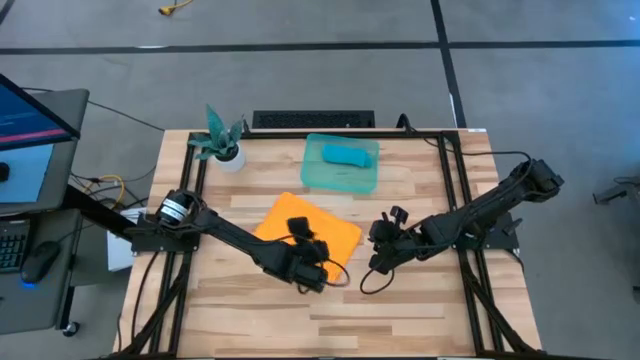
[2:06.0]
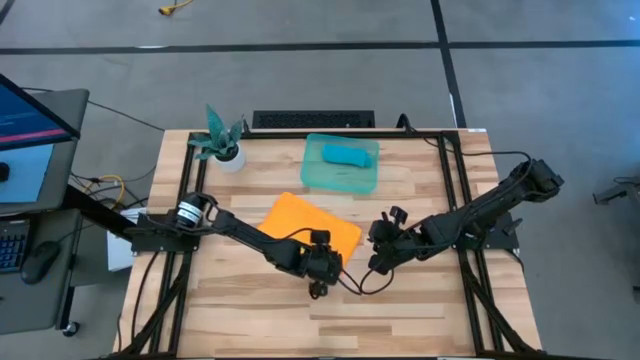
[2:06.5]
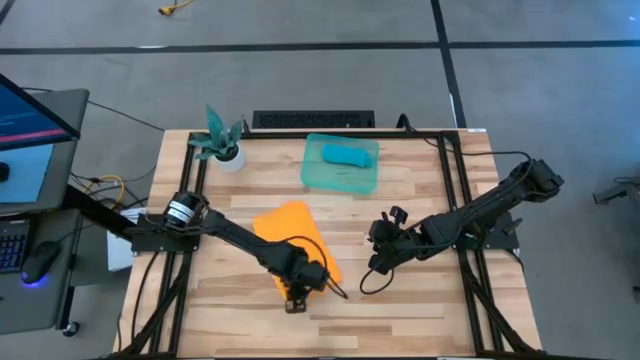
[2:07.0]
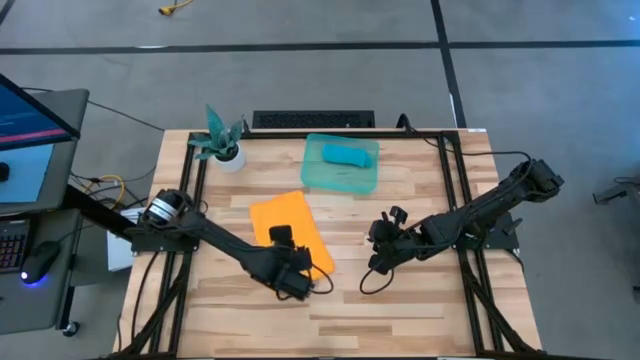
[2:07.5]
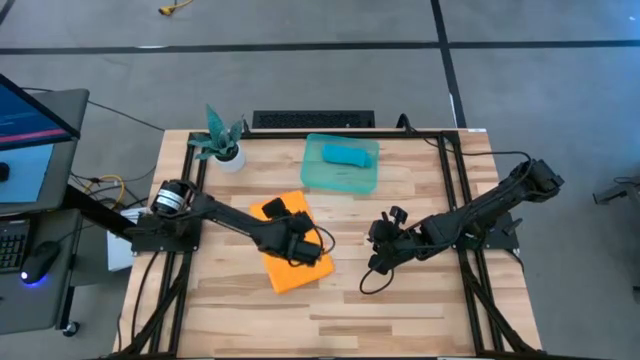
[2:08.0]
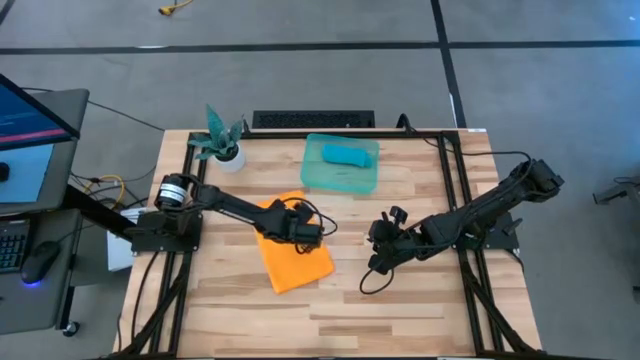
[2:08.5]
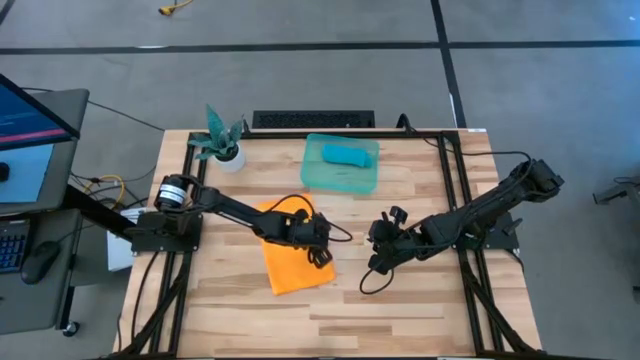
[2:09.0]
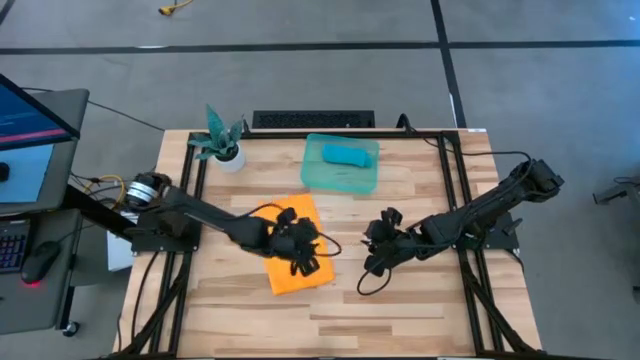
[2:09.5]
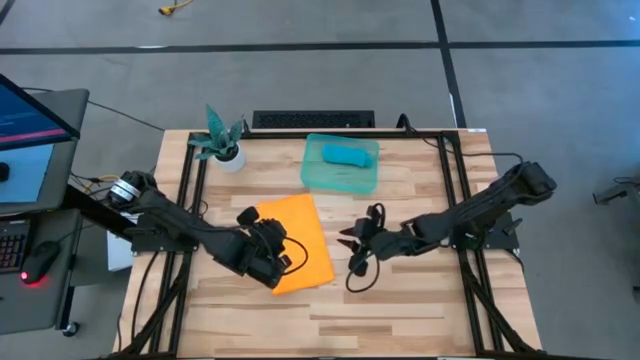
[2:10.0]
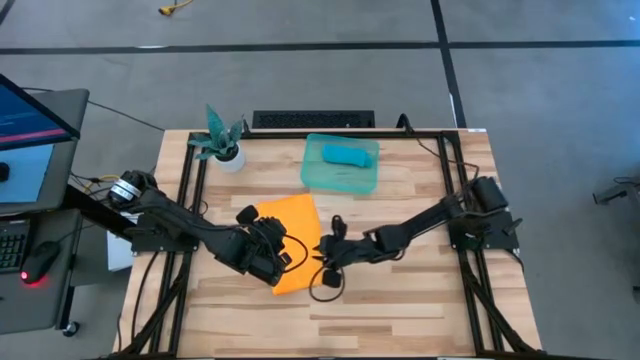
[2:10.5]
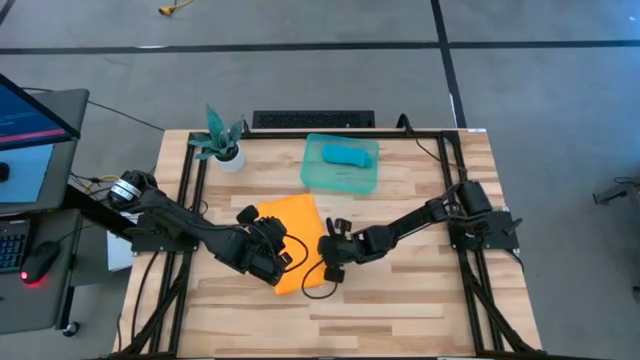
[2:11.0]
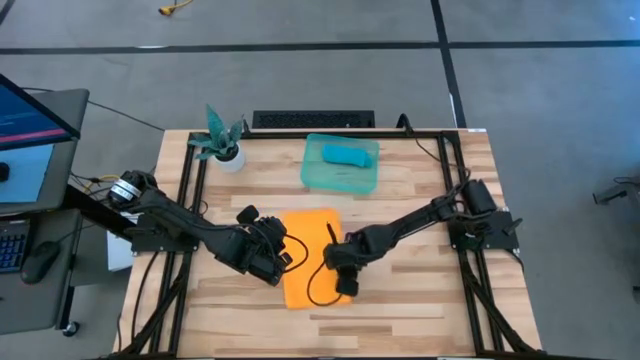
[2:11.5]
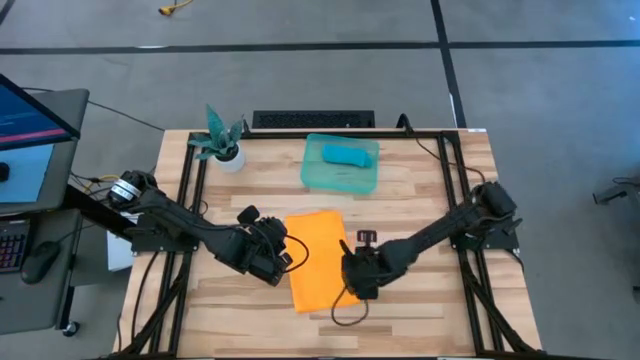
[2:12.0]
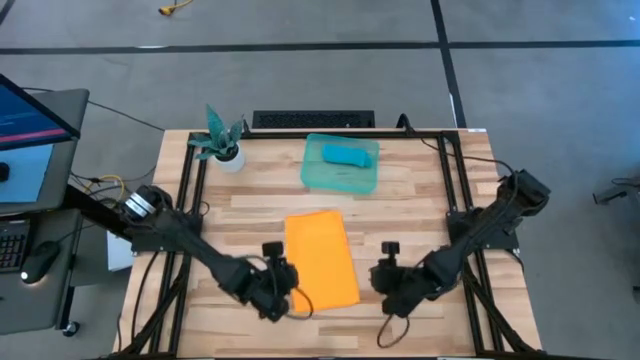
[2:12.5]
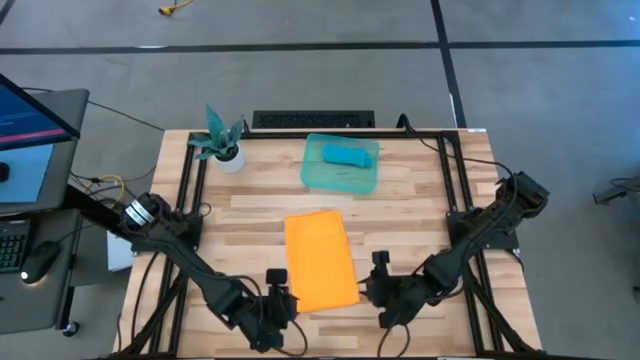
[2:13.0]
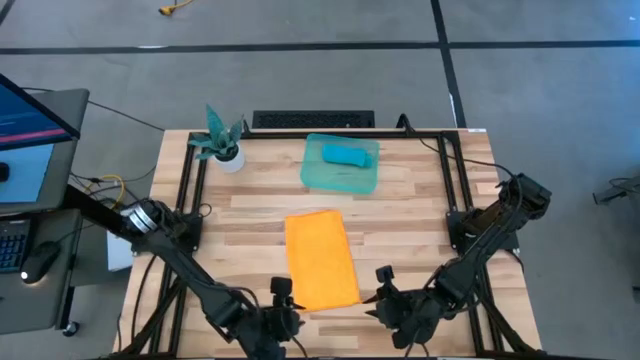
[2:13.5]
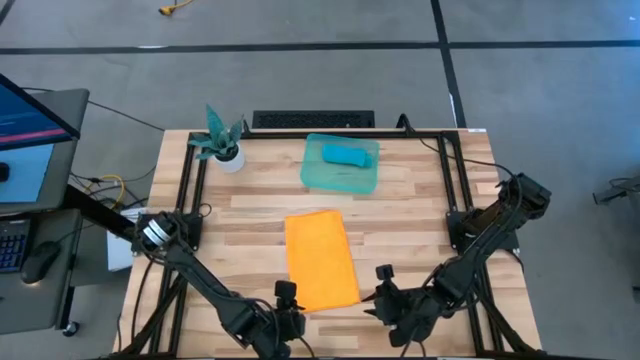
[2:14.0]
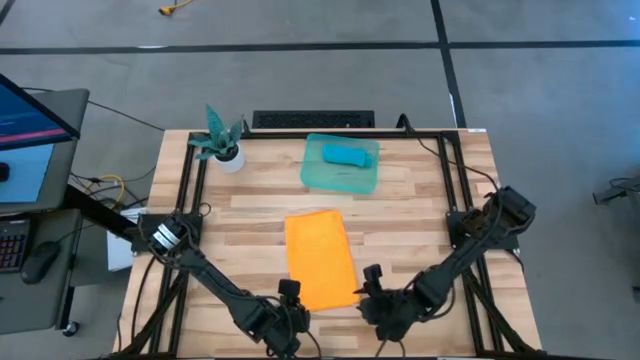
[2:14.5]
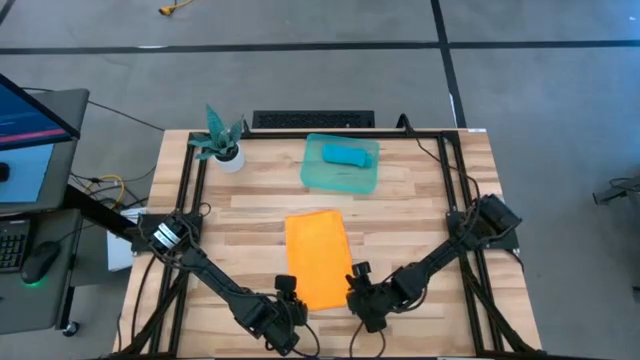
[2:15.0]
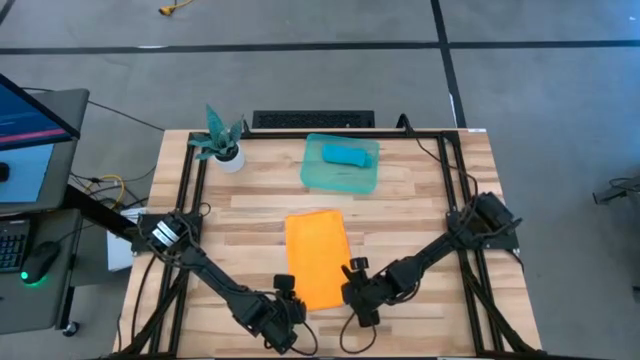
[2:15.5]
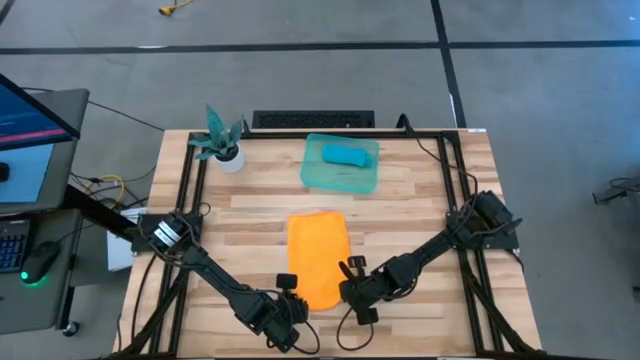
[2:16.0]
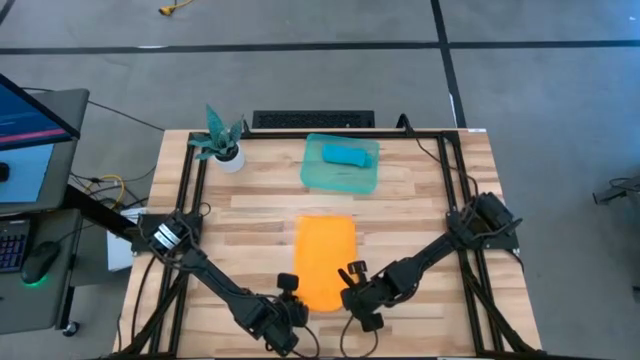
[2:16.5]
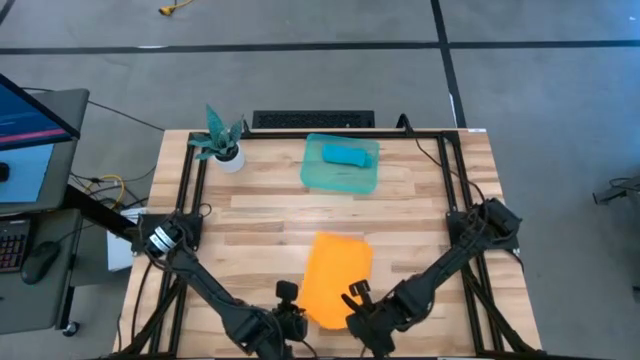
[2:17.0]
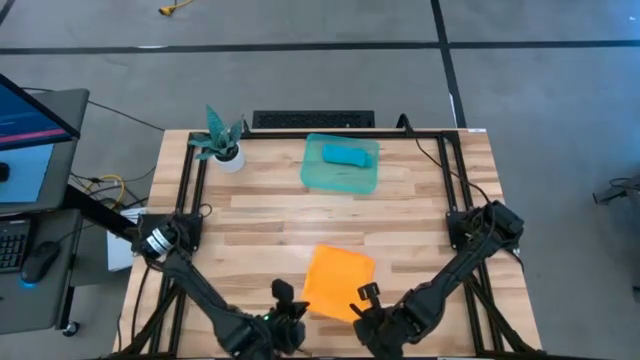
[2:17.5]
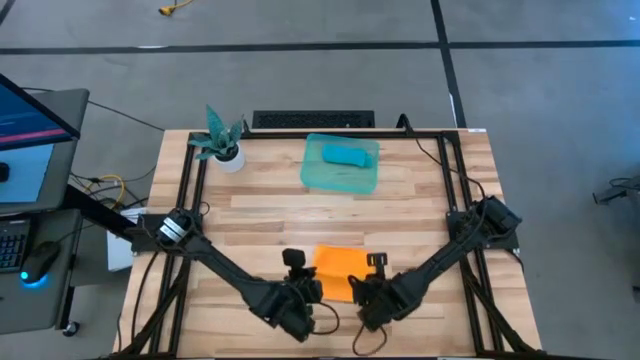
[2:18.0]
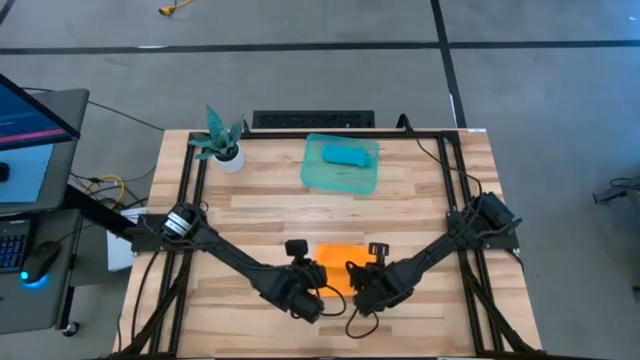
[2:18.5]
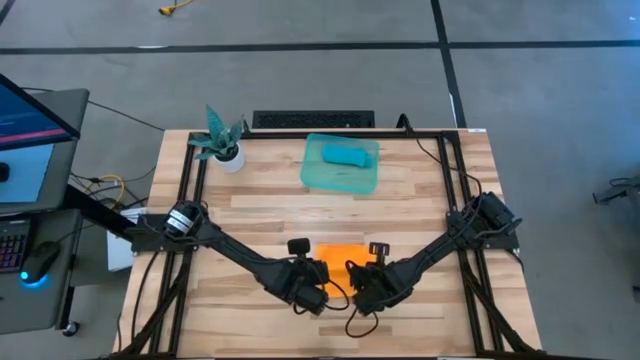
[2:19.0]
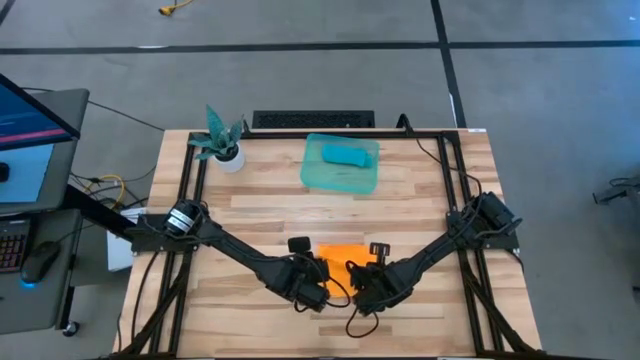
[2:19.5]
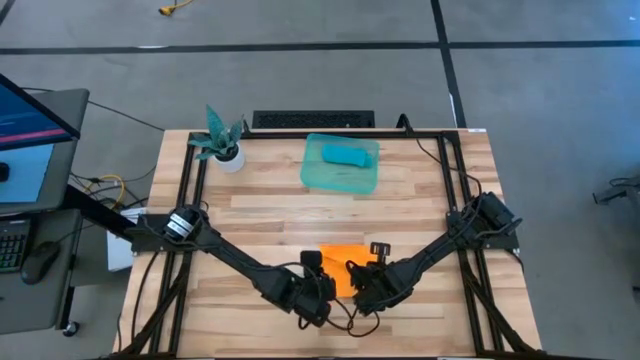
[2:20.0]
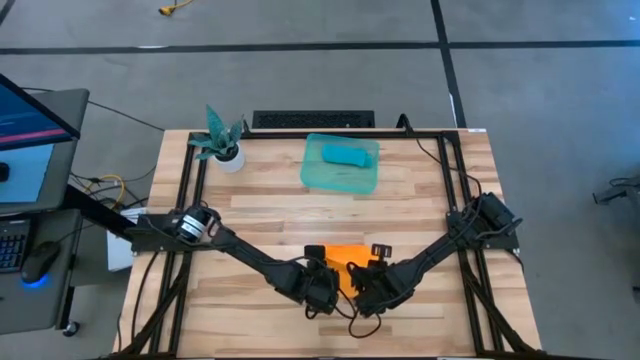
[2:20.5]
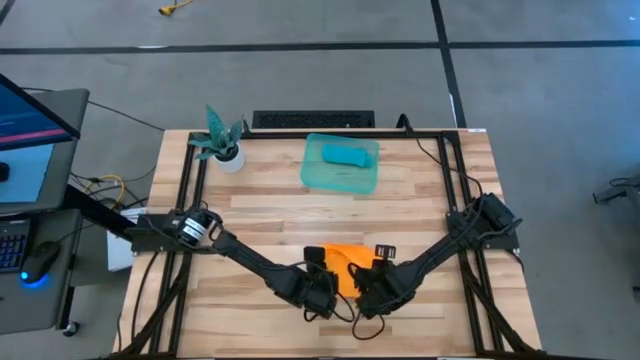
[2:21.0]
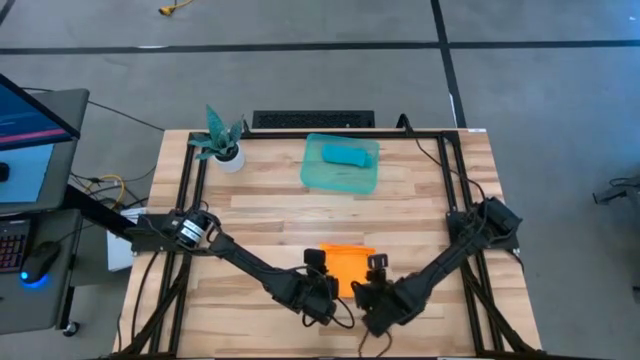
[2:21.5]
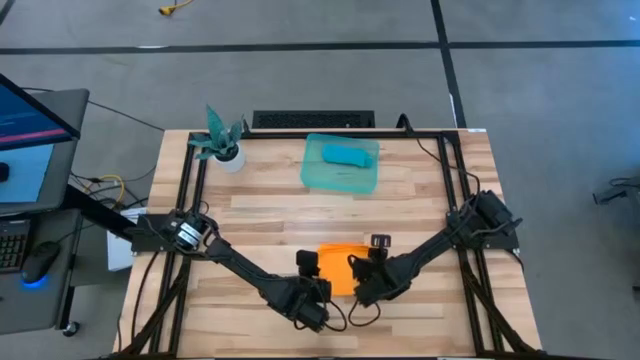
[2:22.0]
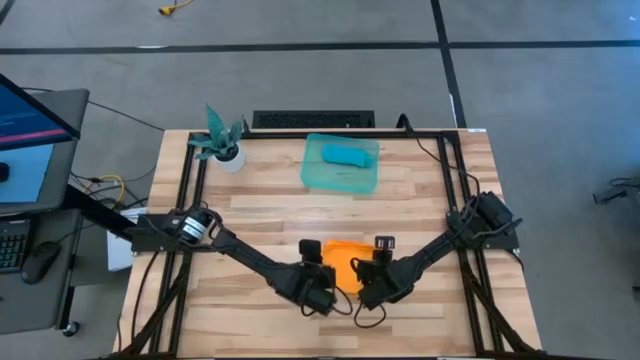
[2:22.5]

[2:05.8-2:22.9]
Task: Roll microfiber towels into tight, uniform cylinder then place into a basket
Fold the yellow microfiber towel

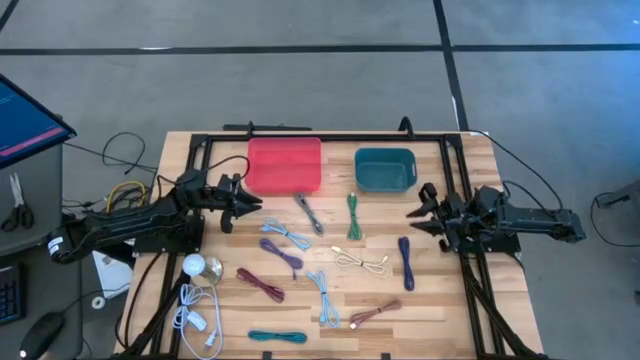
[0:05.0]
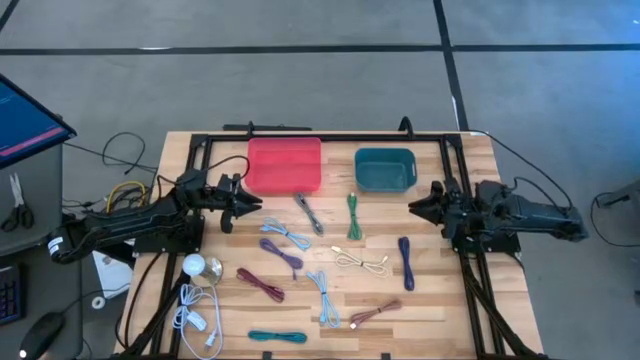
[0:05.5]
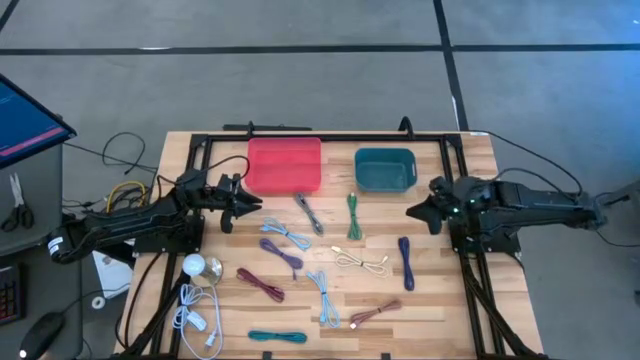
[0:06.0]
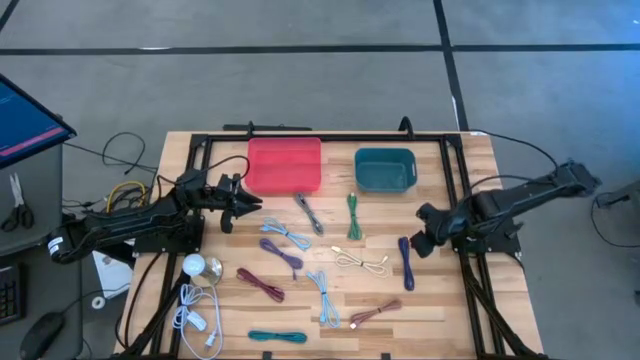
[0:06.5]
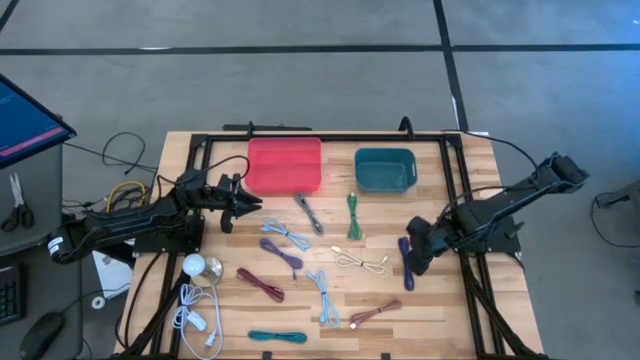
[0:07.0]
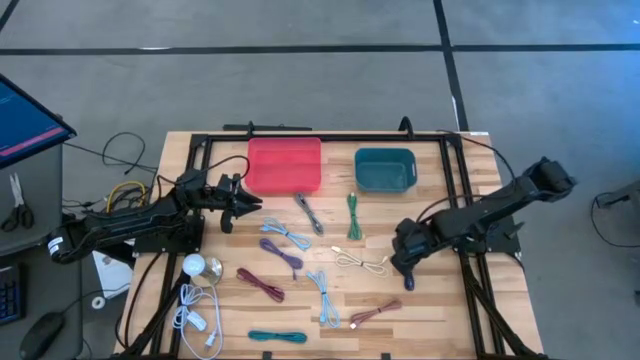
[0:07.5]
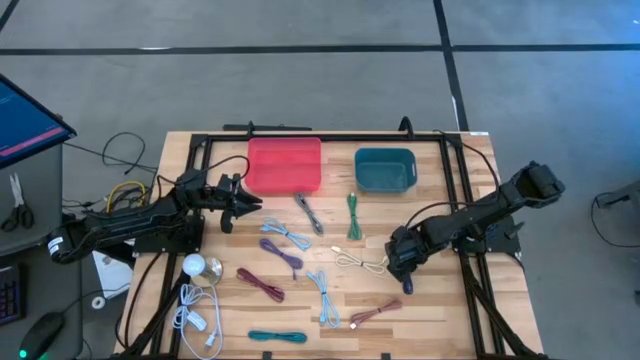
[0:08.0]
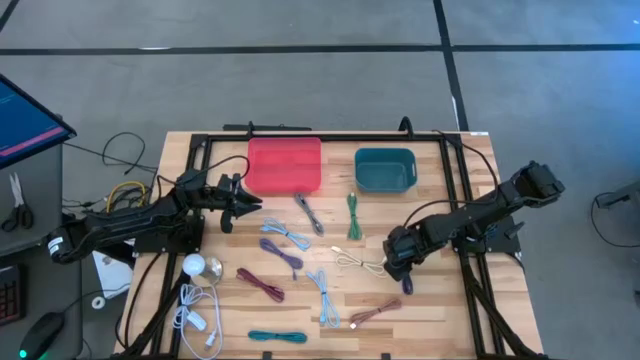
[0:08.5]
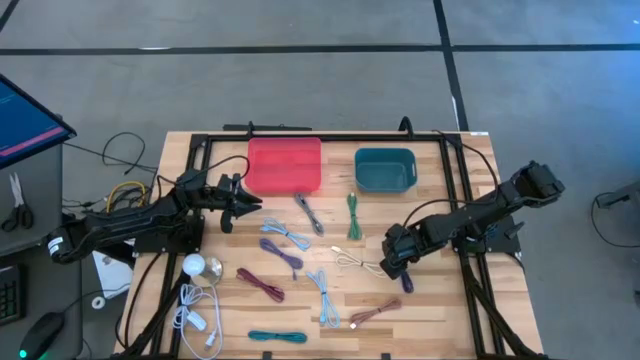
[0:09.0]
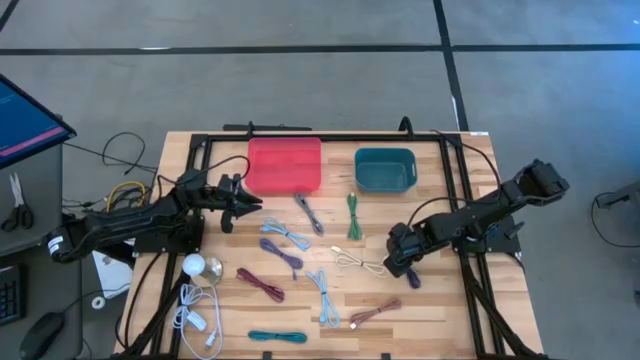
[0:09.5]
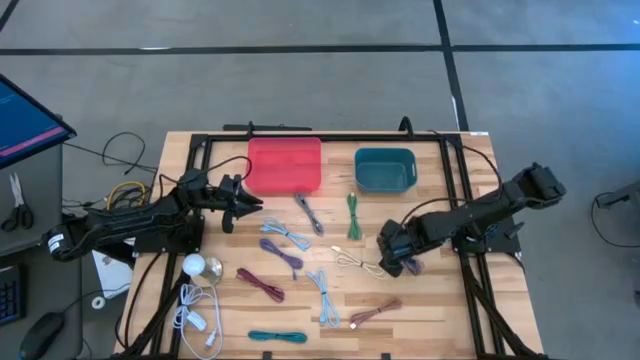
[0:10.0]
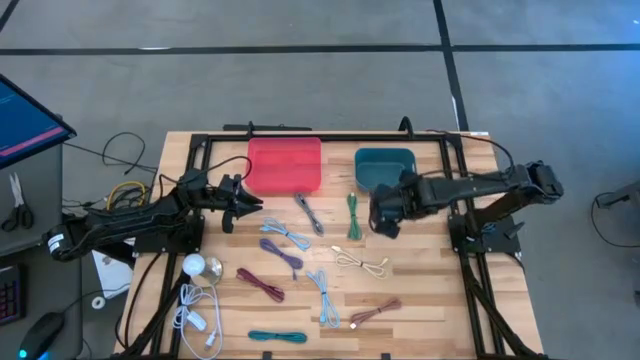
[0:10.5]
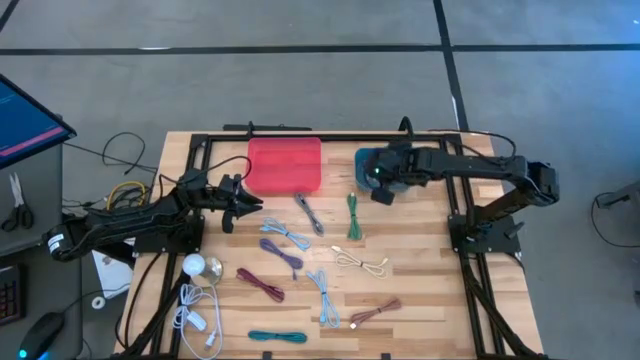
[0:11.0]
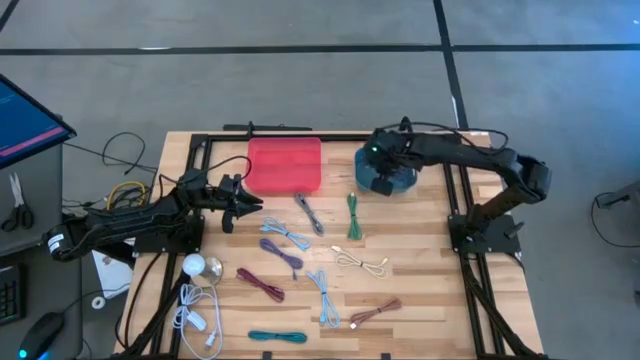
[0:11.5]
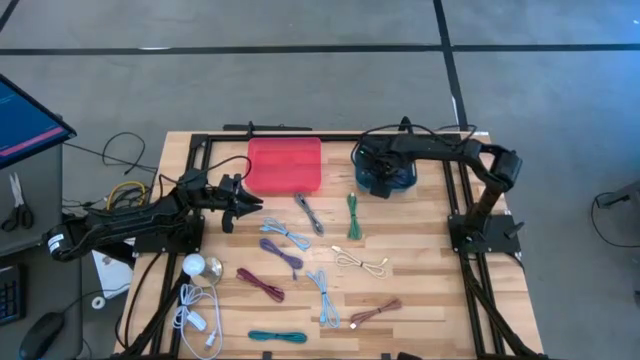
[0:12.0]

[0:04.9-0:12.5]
Task: Pick & Place USB Port
Put the black and blue charger cable into the green bin
